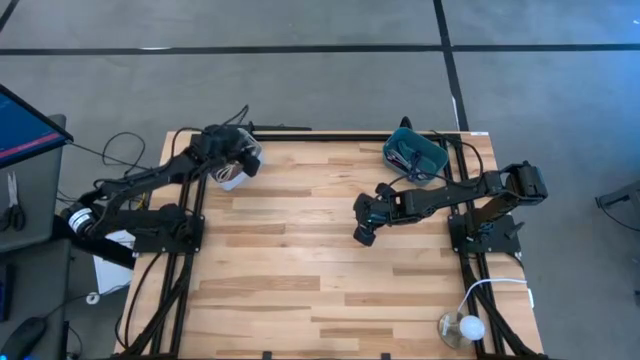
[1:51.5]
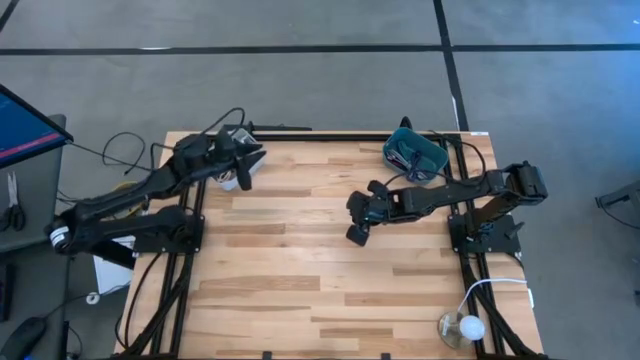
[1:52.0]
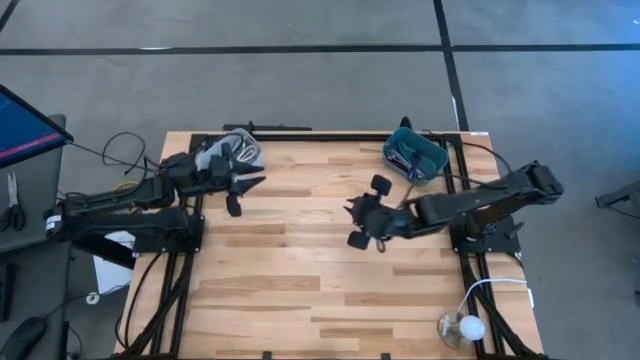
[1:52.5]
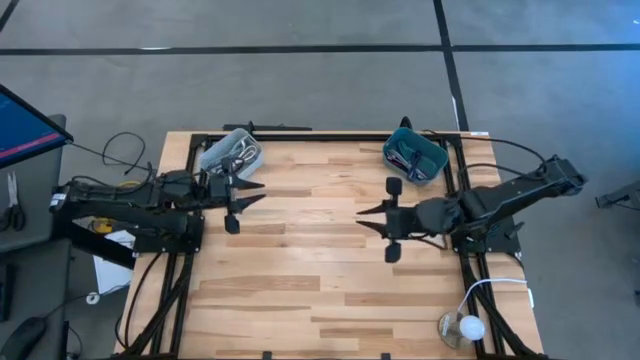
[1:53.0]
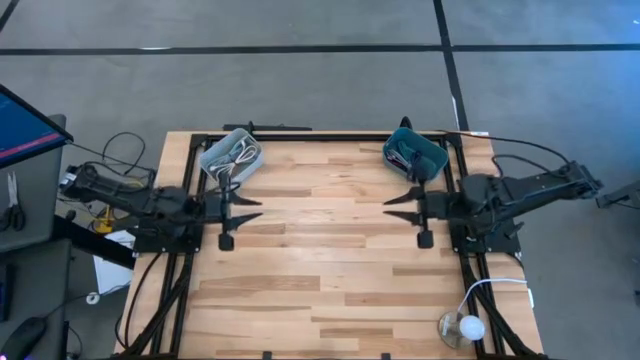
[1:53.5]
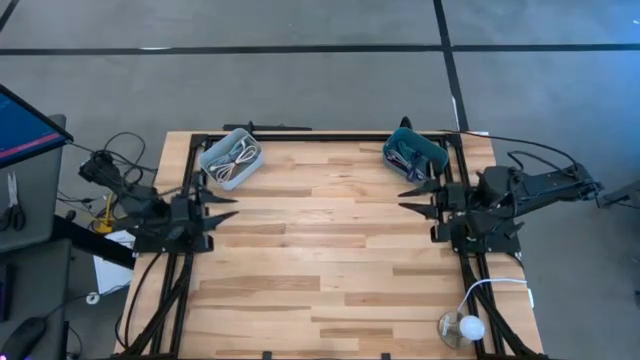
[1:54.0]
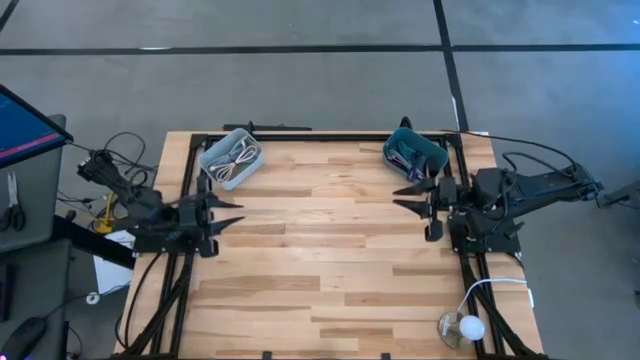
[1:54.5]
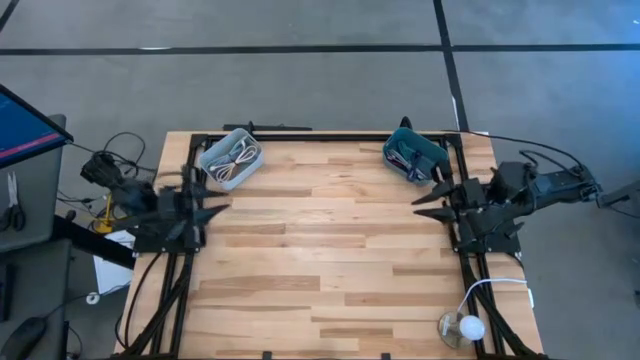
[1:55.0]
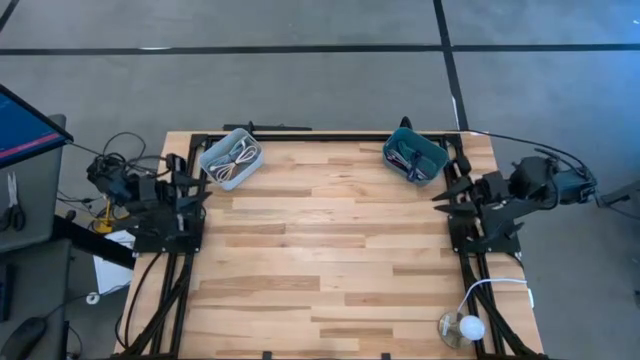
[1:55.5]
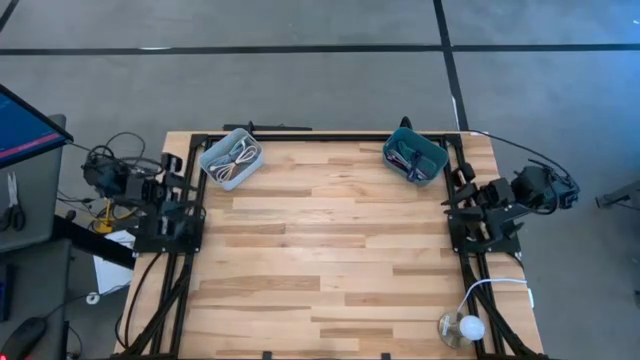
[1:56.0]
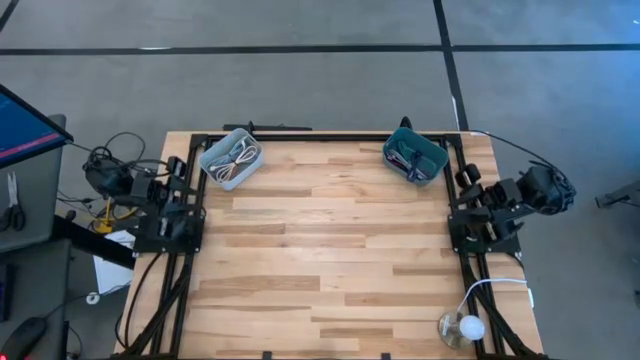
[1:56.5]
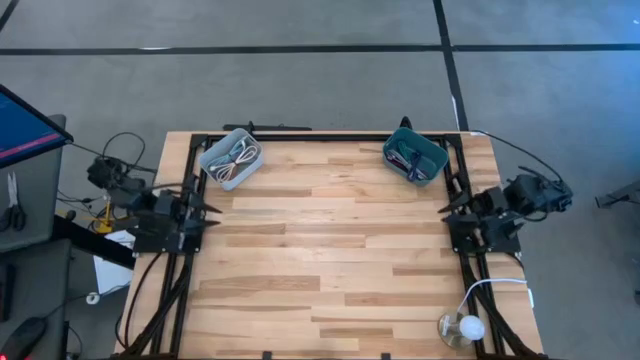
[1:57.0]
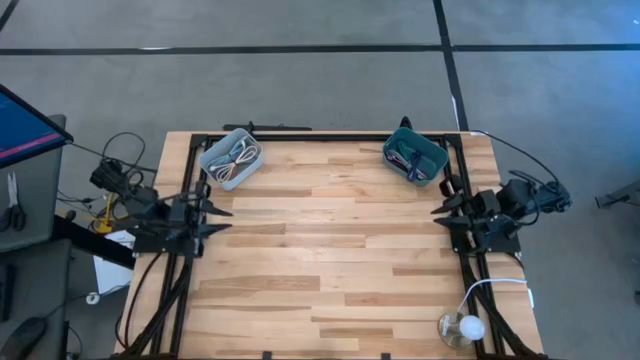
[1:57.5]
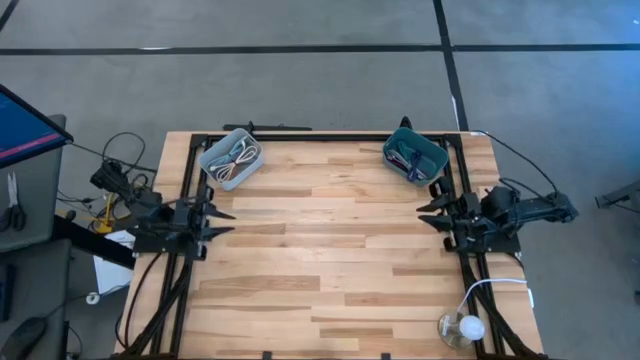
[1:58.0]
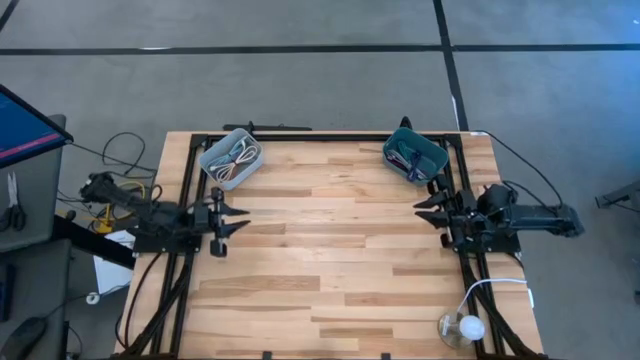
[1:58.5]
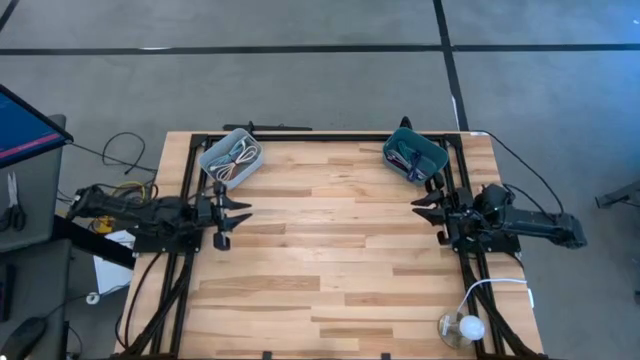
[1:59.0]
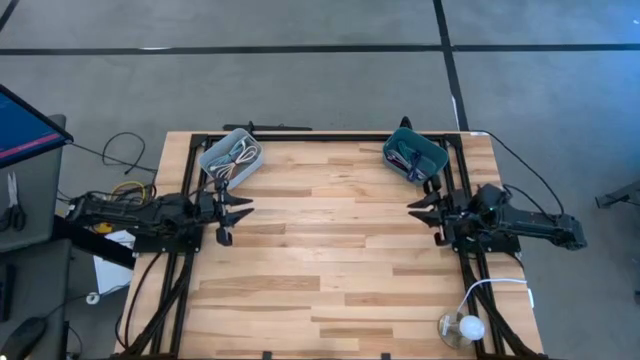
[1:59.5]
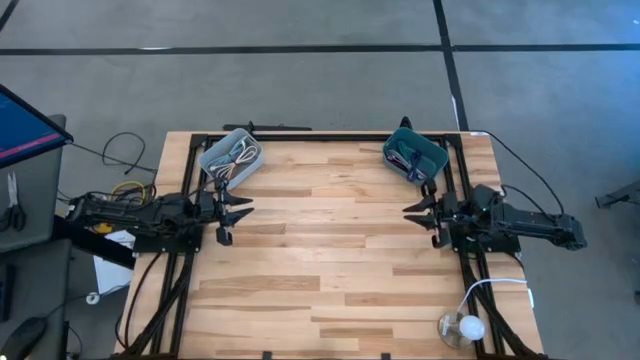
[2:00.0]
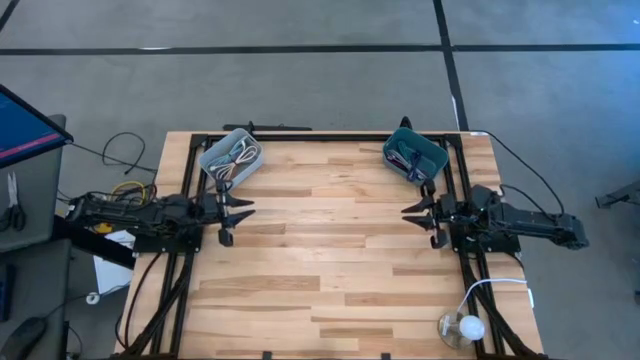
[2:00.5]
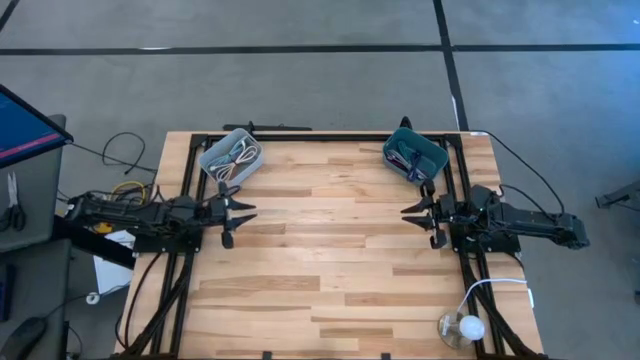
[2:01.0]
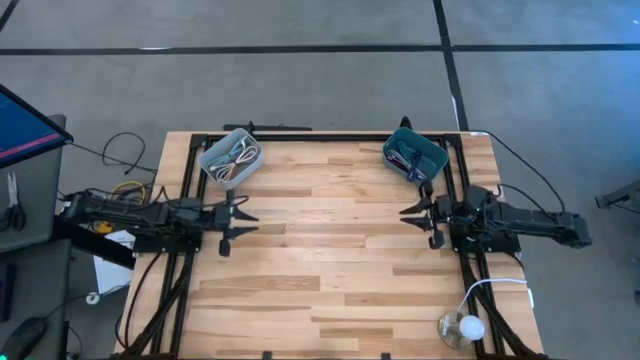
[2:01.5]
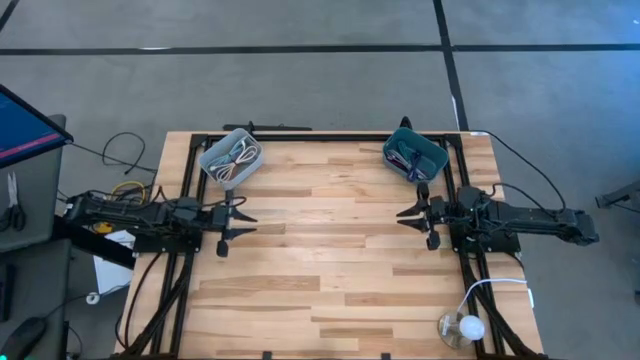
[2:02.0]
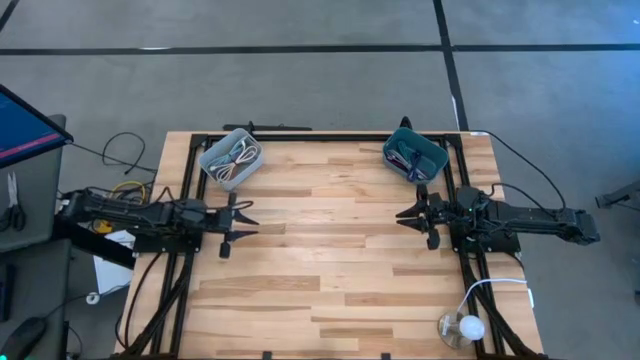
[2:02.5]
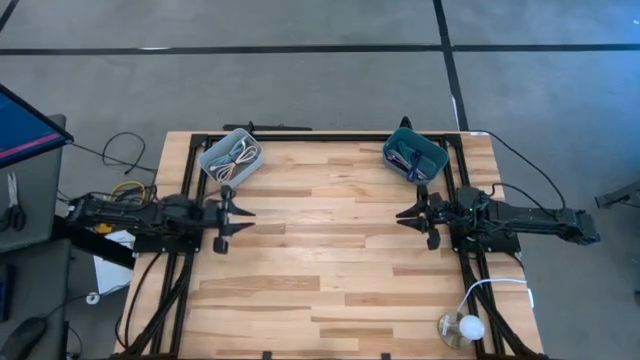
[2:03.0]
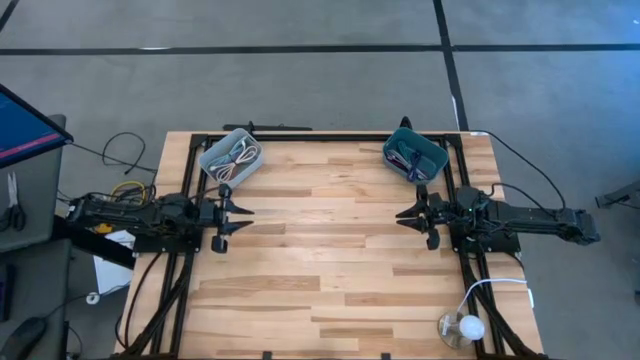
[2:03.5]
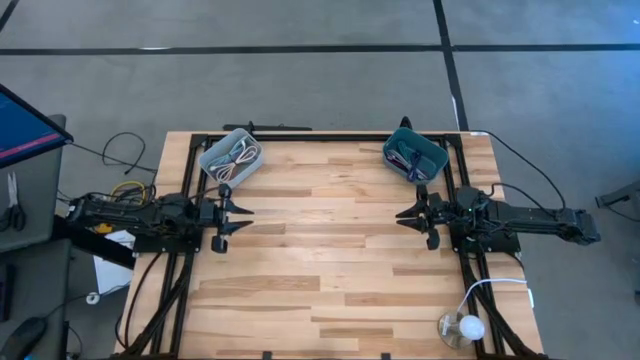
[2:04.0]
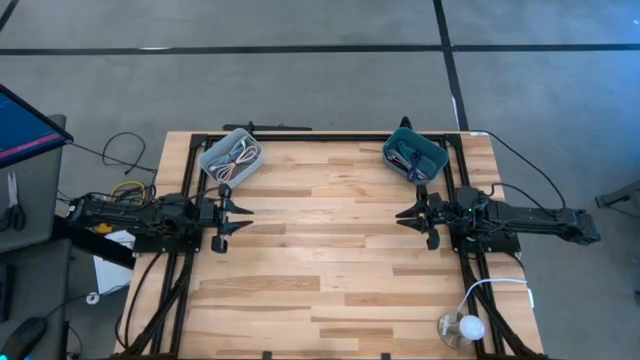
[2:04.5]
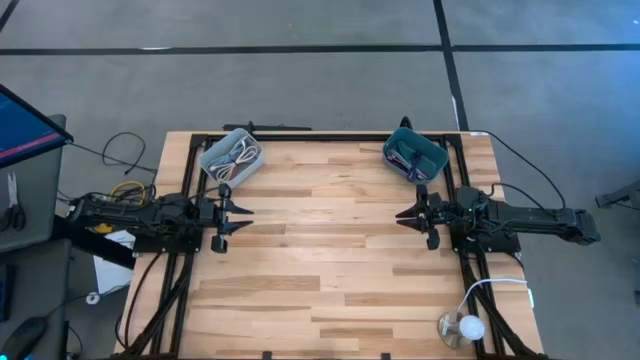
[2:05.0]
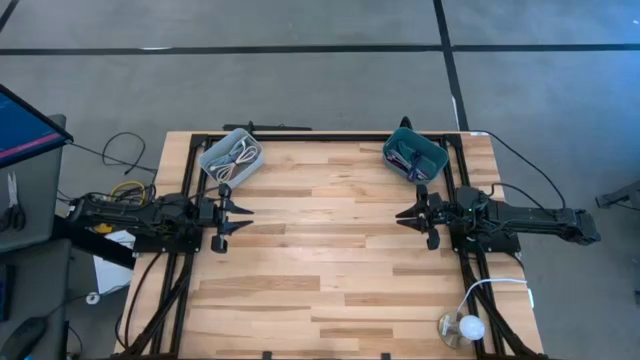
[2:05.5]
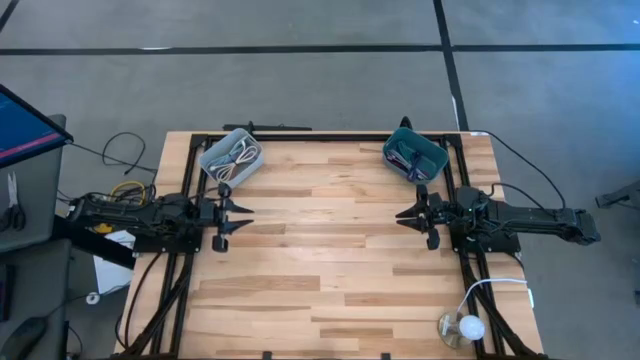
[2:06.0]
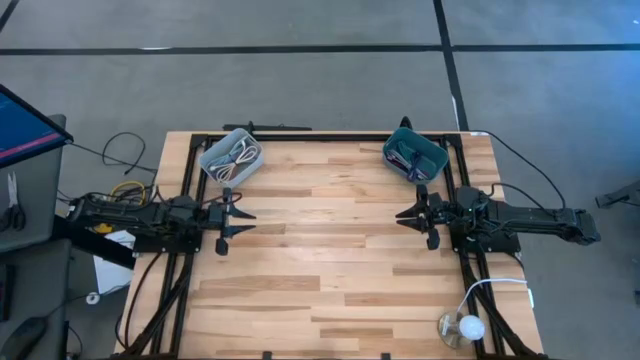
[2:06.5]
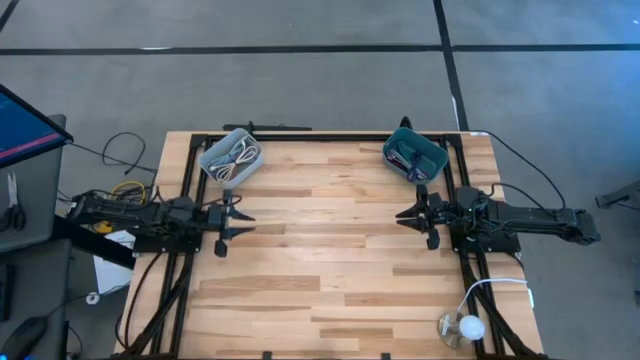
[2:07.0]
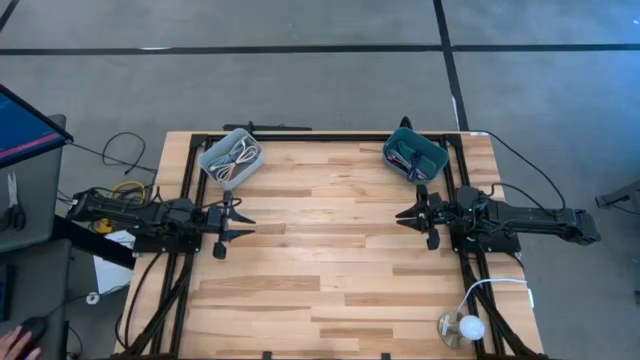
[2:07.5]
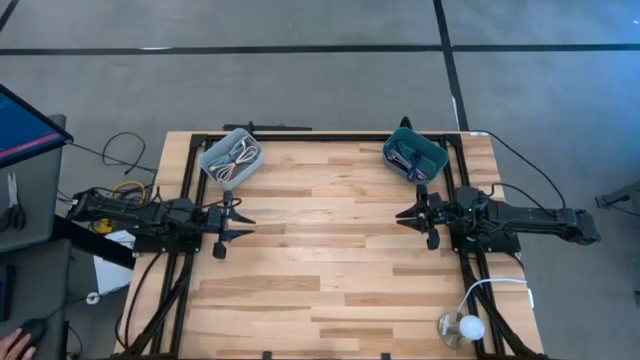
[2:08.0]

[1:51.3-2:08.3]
Task: Pick & Place USB Port
Return to Home Position

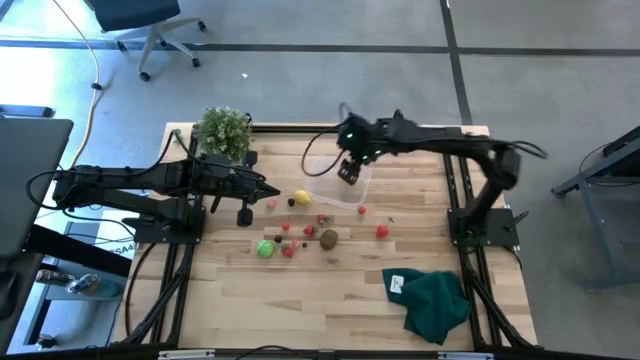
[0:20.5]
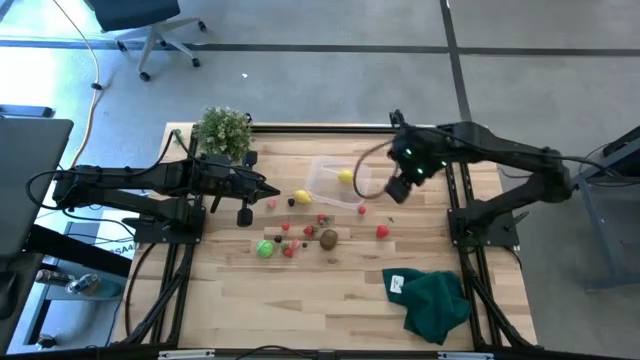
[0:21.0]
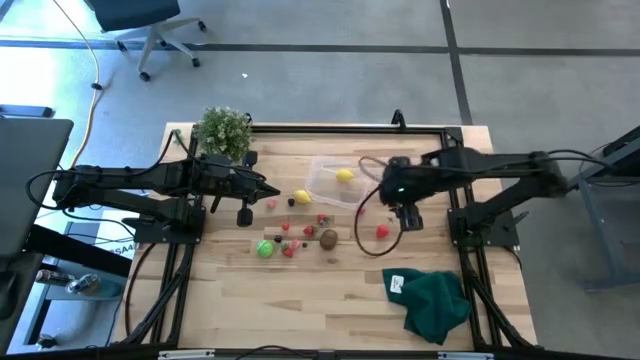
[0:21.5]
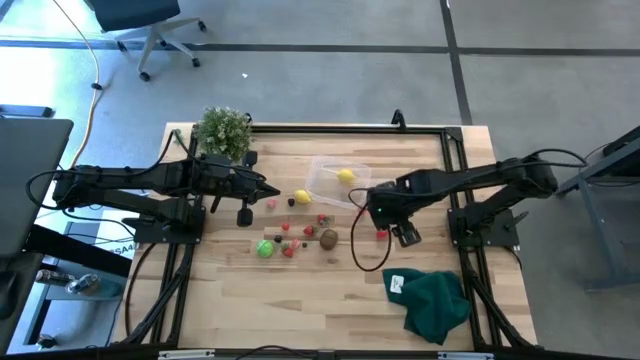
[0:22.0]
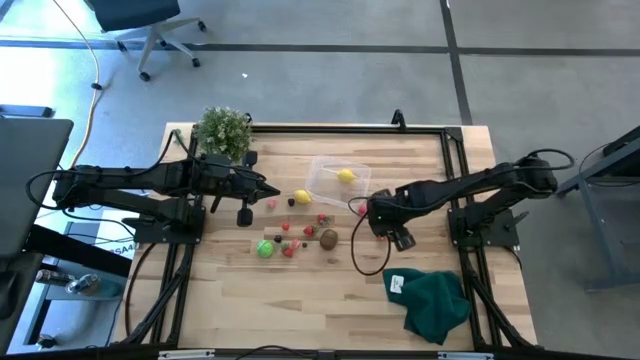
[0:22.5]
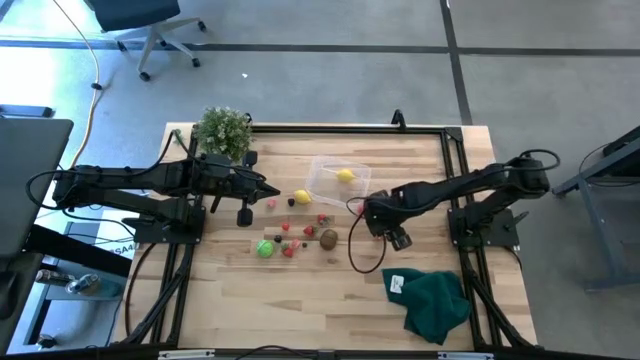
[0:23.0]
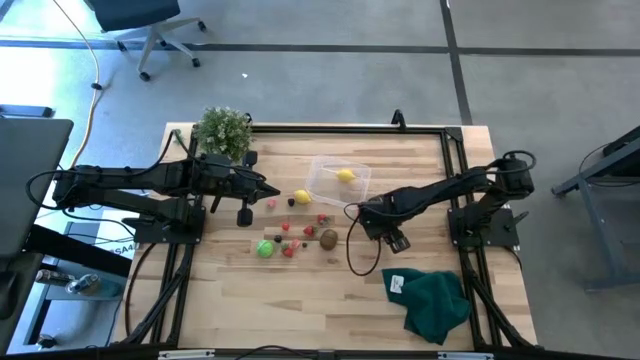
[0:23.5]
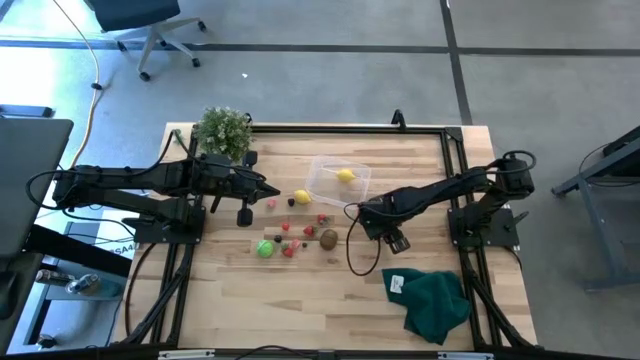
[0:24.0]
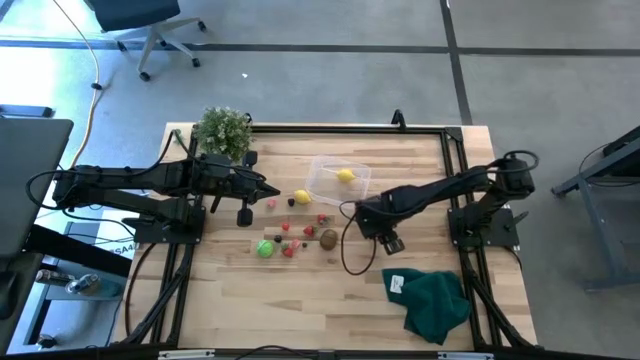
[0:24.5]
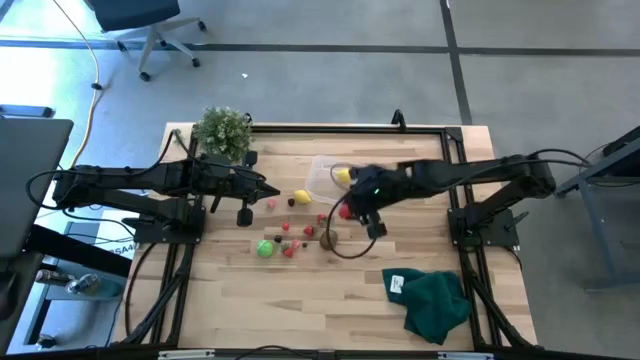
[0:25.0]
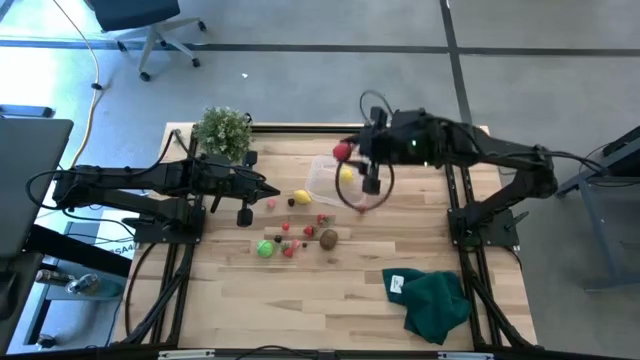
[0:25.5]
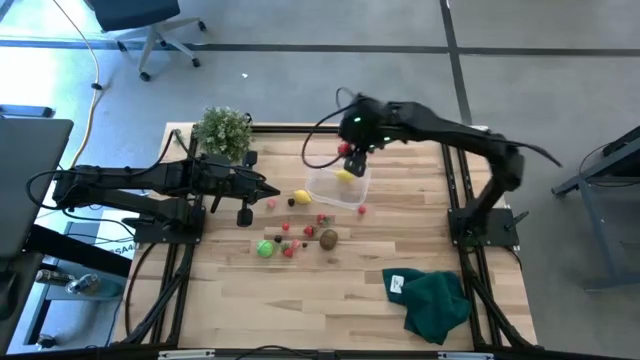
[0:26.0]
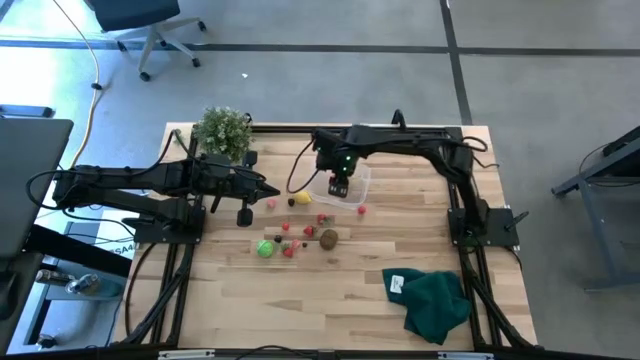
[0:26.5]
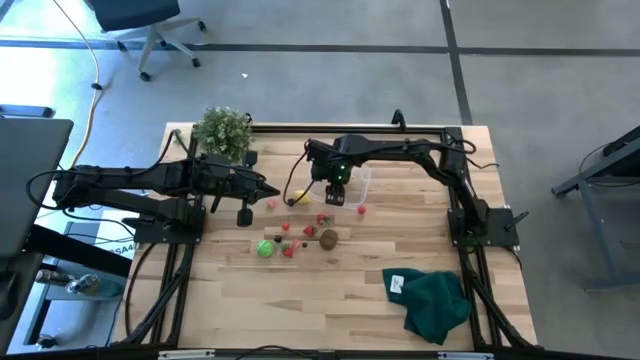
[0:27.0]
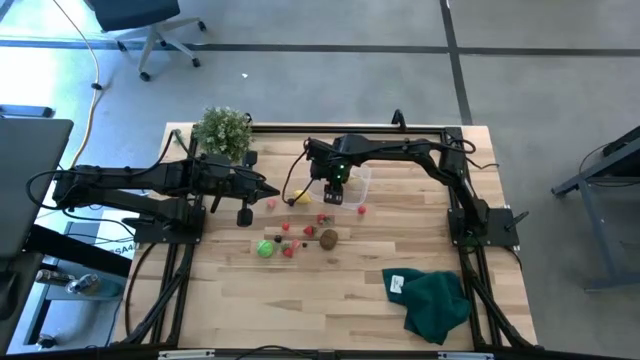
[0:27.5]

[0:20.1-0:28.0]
Task: Pick and placing Produce into tupperware
Put the red strawberry into the transparent bin
